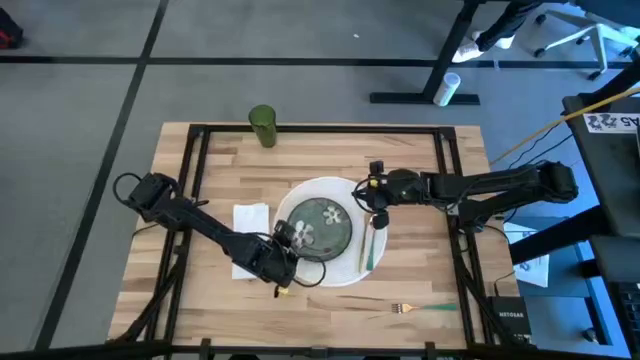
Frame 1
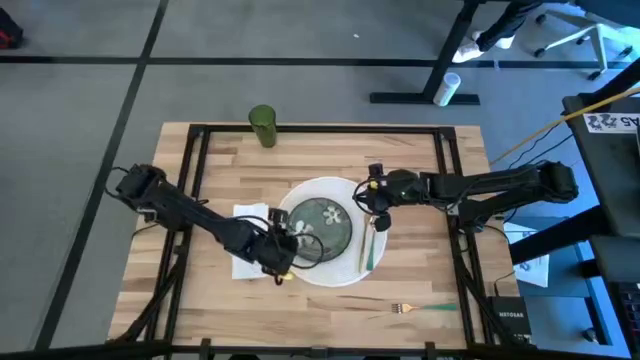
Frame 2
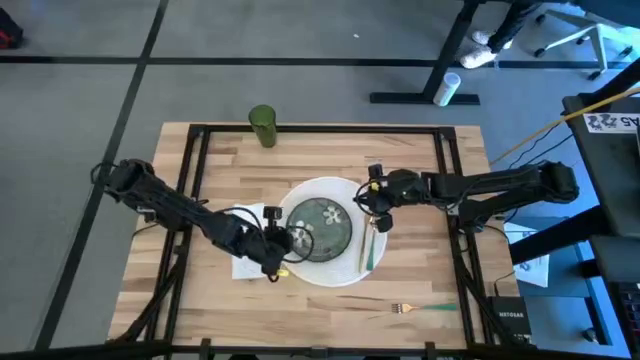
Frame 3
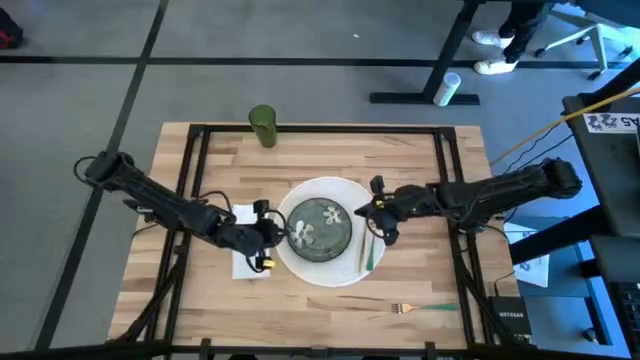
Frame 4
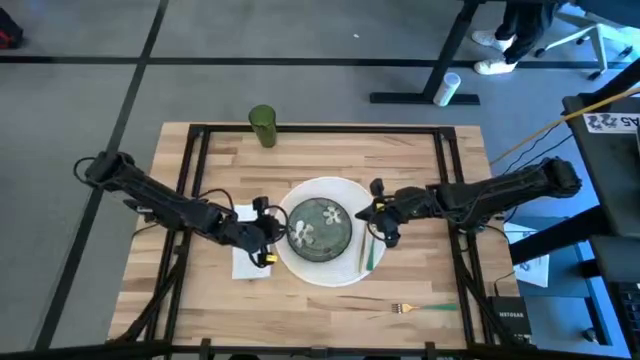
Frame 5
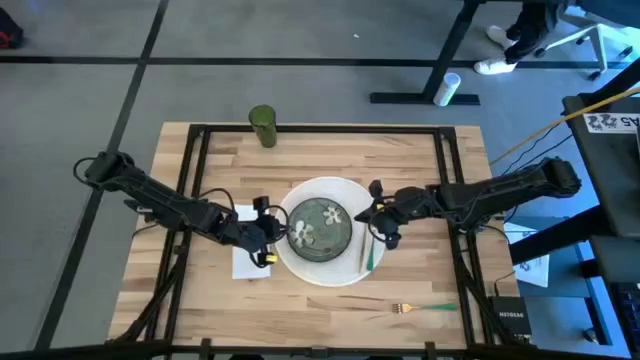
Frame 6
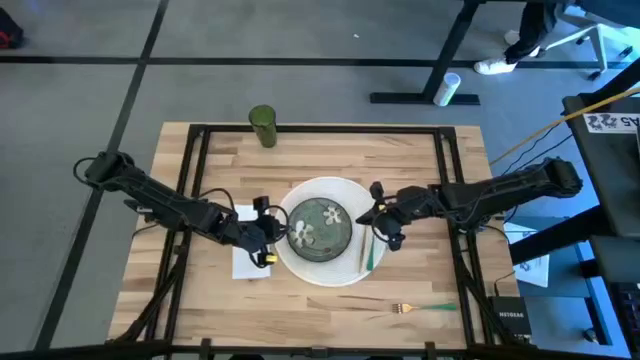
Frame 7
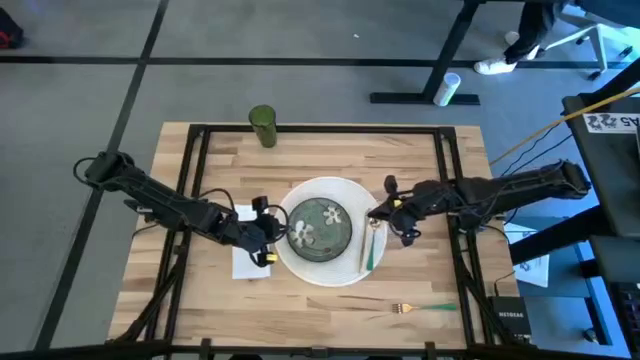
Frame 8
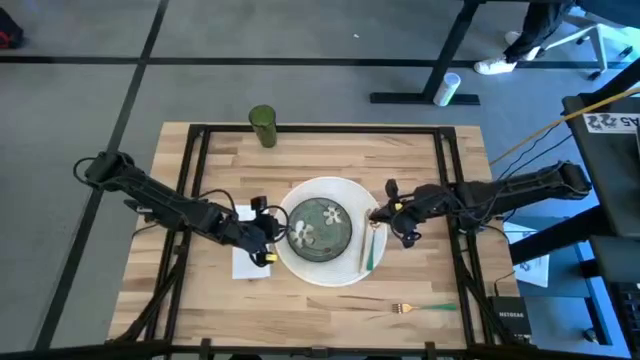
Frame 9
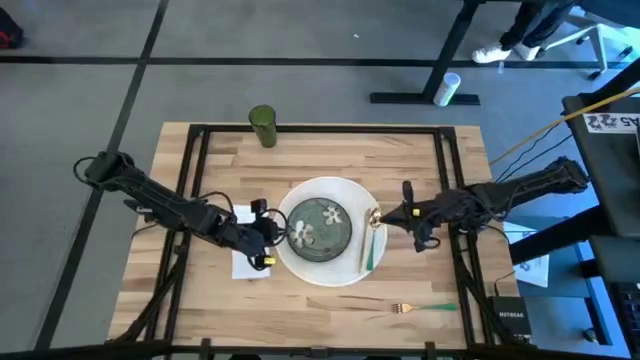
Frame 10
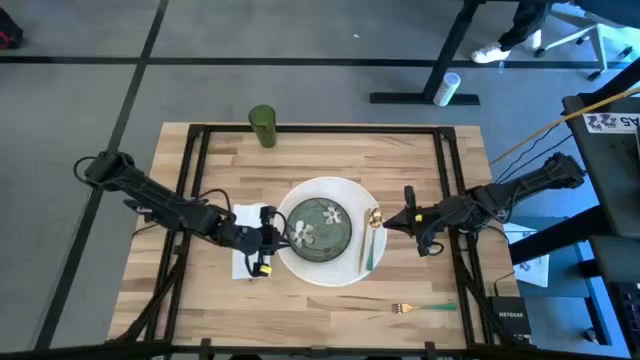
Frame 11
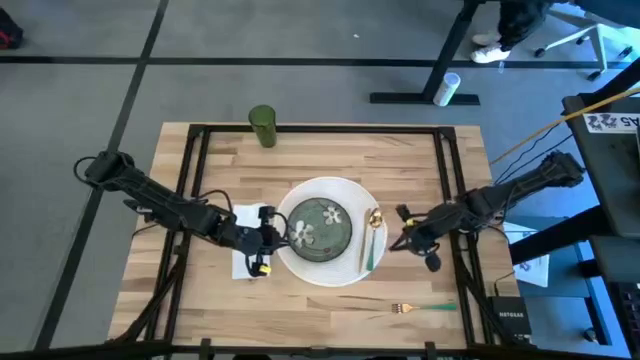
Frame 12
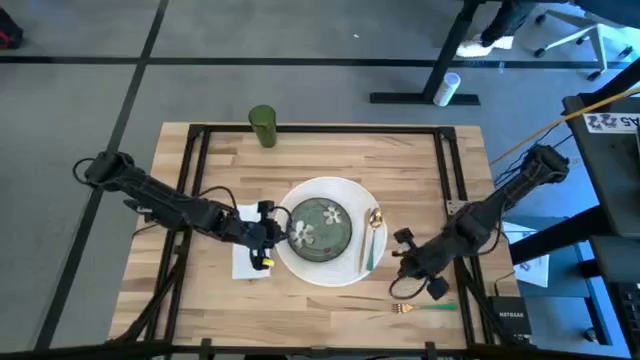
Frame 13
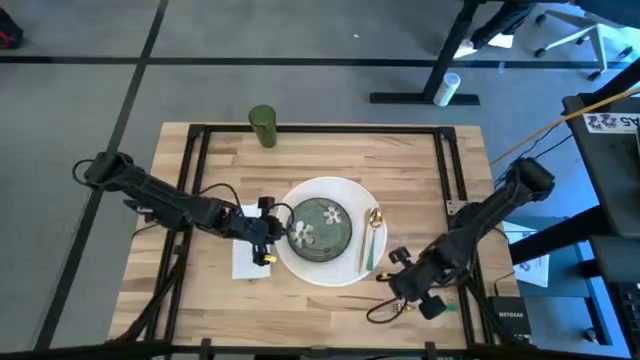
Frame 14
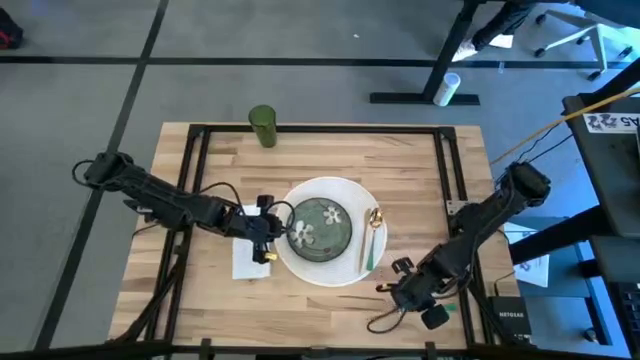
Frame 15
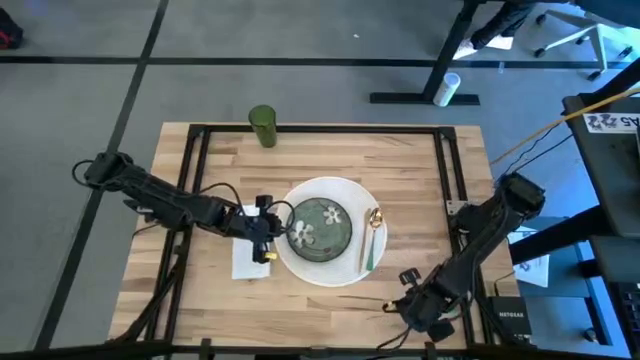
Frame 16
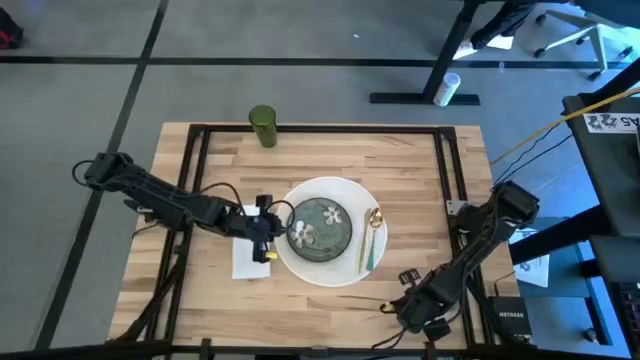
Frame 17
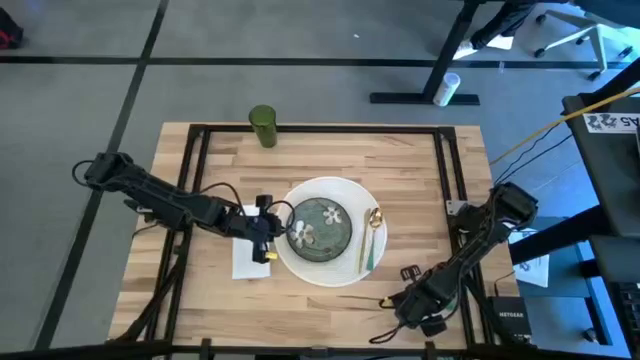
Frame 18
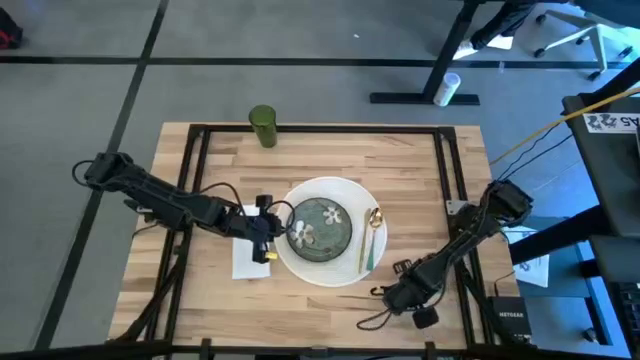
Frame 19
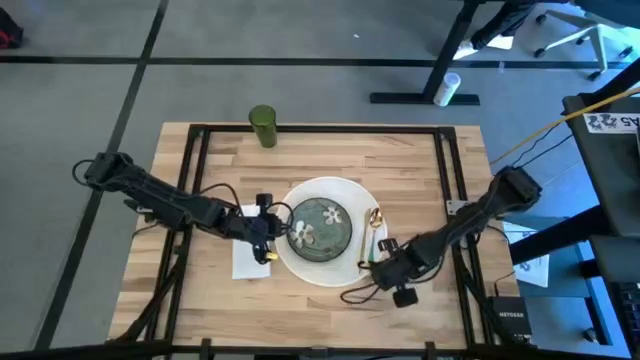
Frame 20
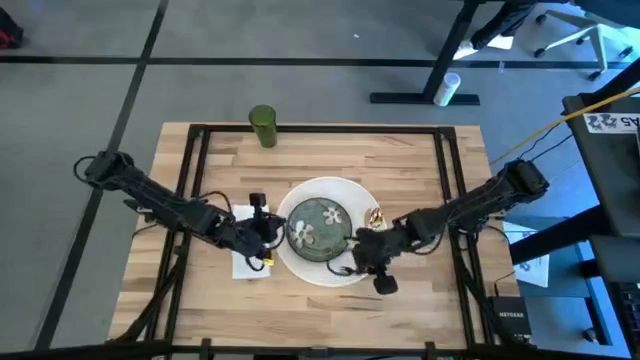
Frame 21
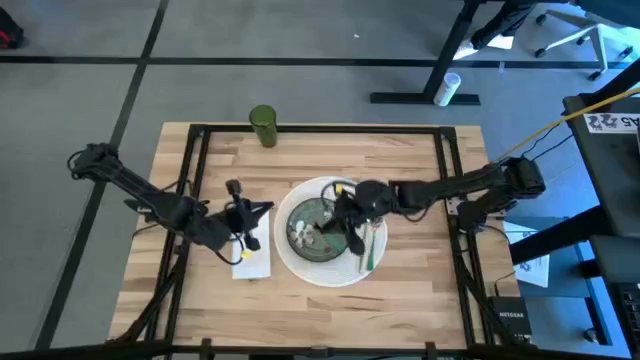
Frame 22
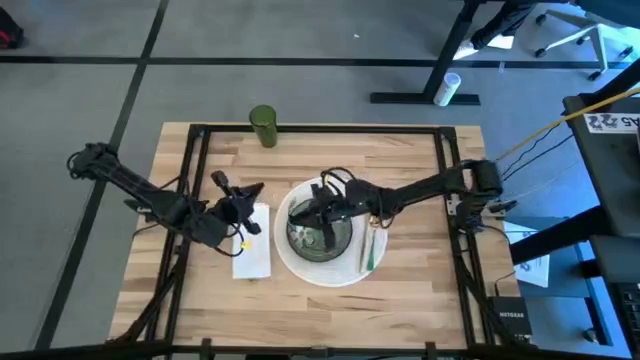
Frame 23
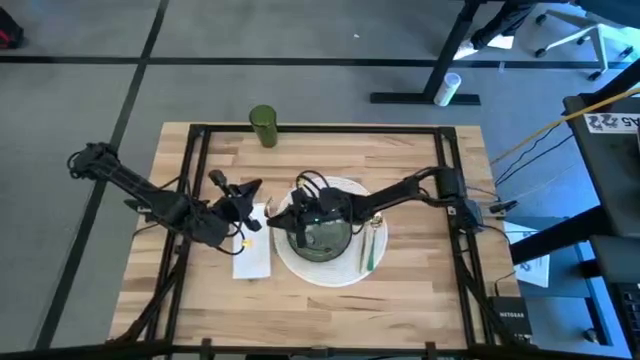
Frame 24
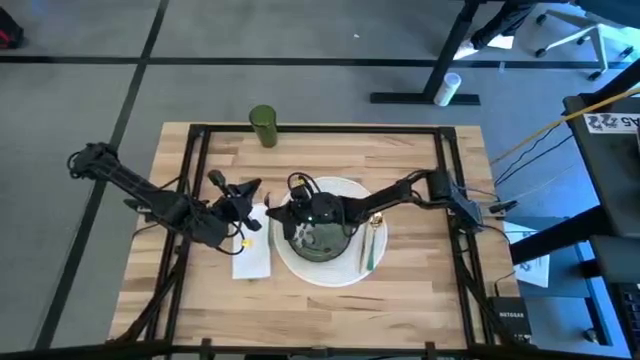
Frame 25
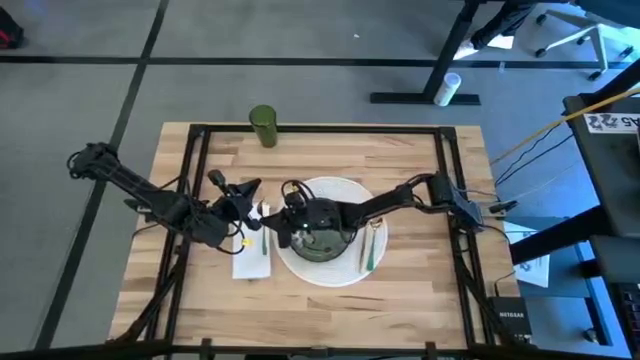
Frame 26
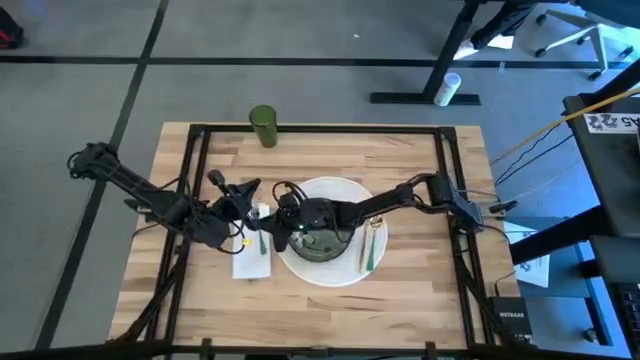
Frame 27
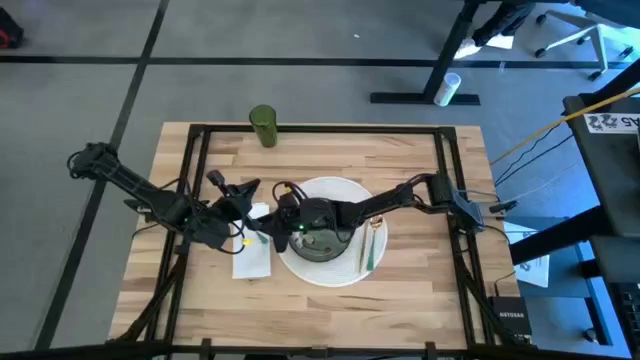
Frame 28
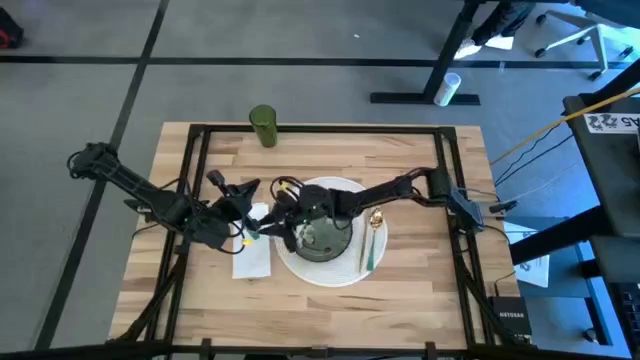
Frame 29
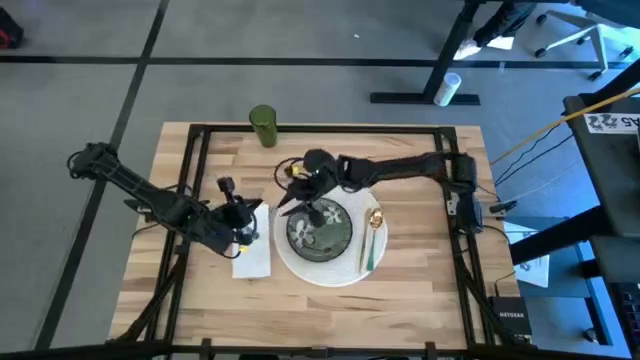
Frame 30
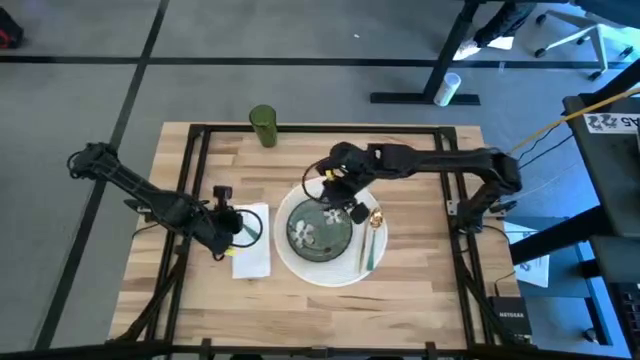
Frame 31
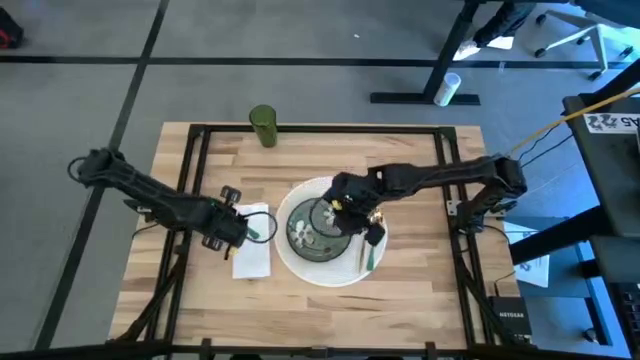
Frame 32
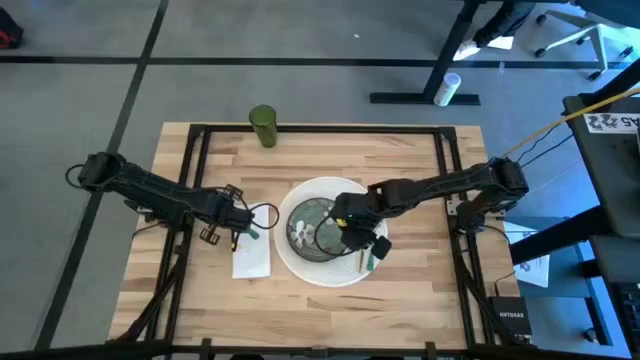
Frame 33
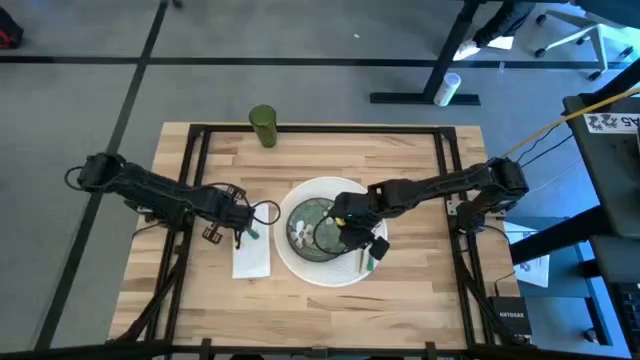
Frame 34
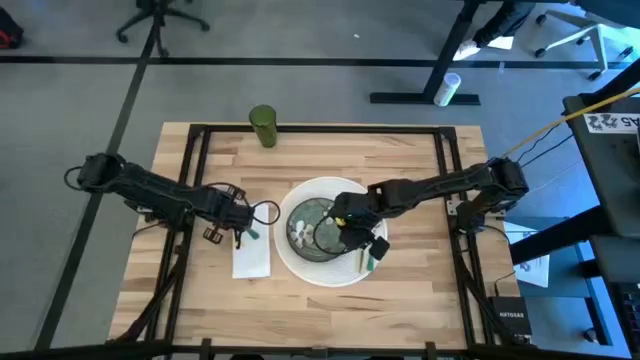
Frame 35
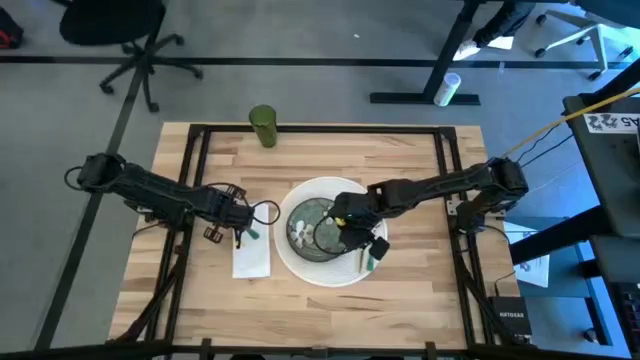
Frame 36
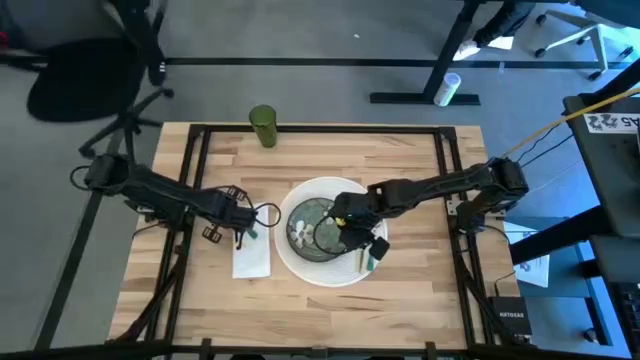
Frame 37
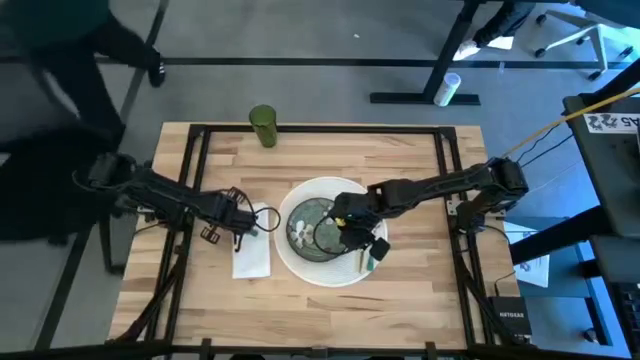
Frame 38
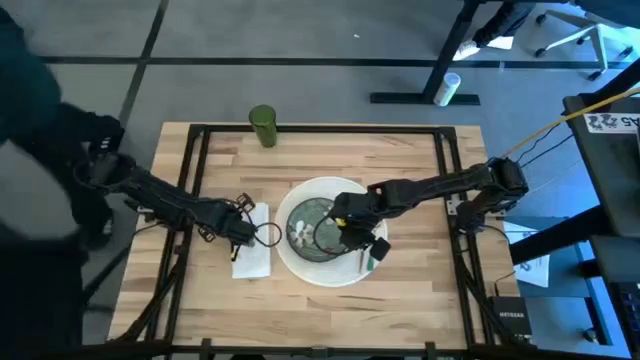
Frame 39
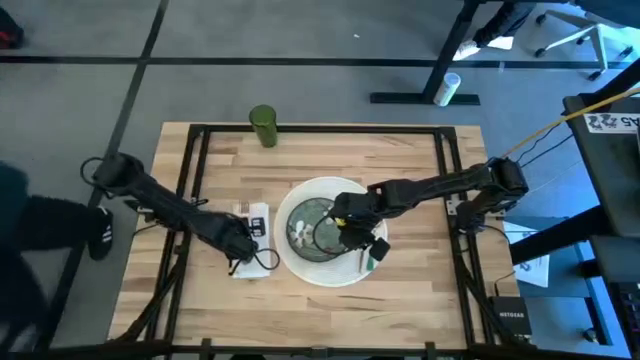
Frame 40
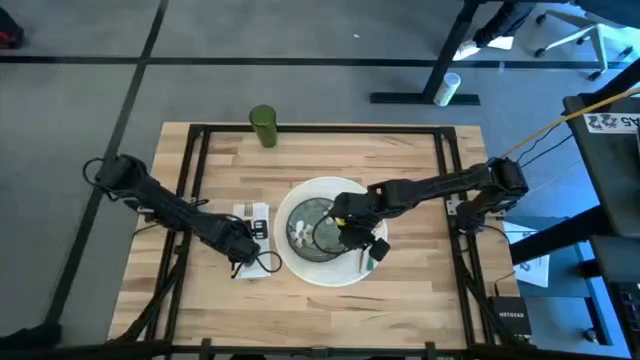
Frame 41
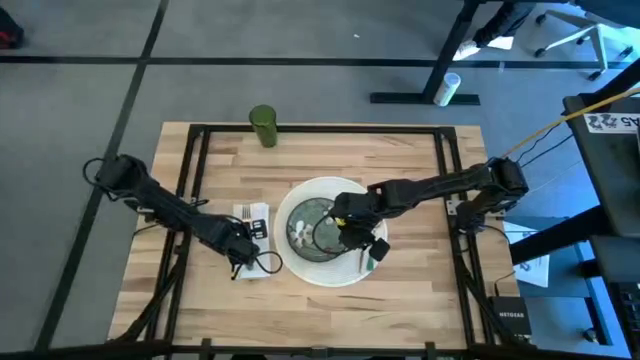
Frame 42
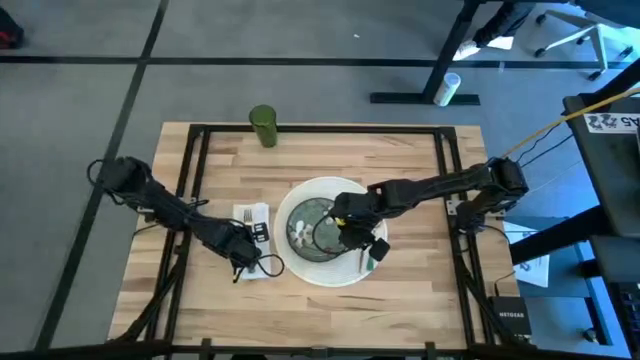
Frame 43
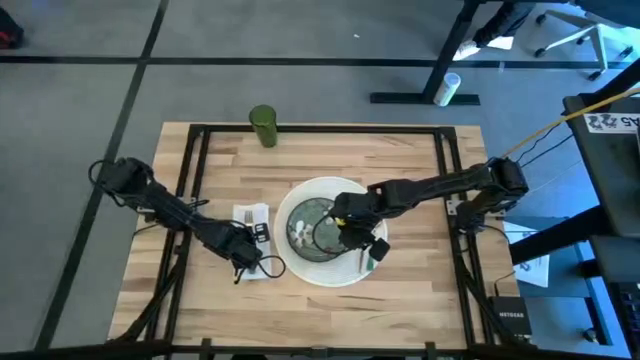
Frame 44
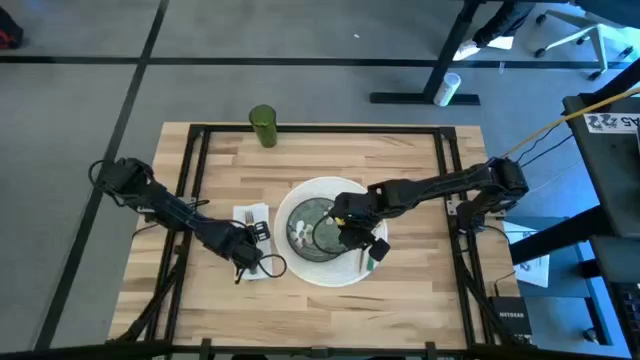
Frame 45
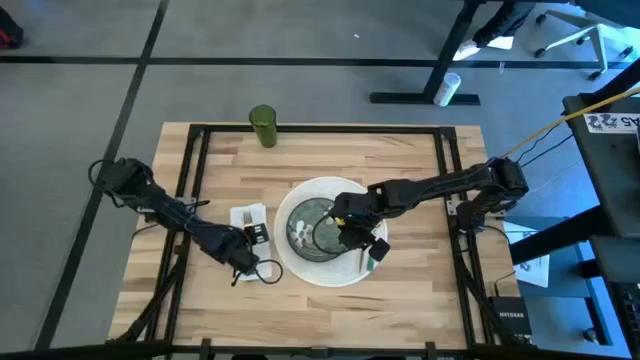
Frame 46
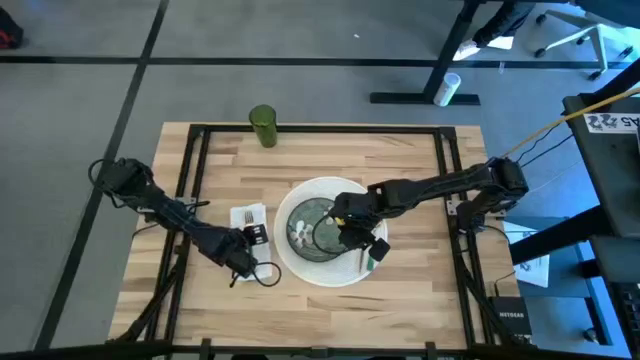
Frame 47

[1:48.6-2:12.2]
Task: Set table place
Put the green fork on the white table napkin
